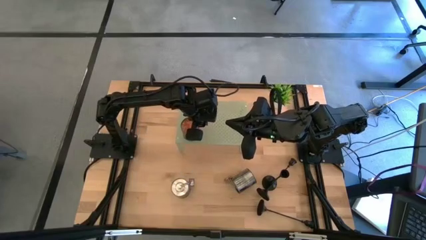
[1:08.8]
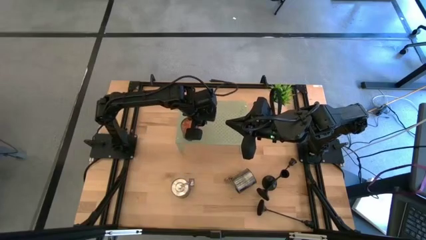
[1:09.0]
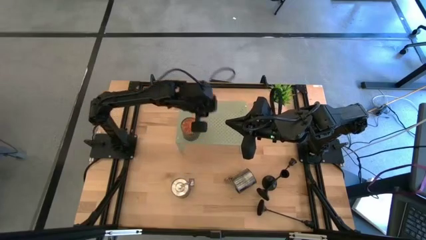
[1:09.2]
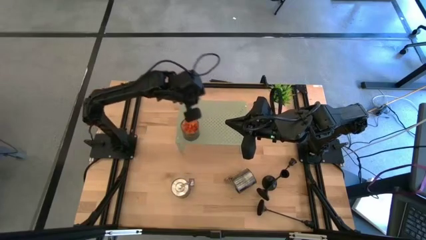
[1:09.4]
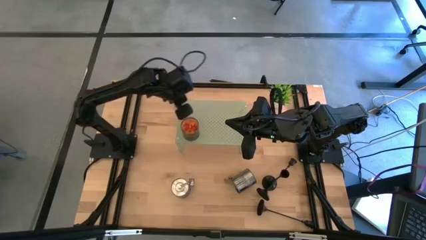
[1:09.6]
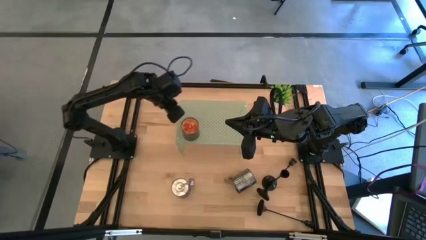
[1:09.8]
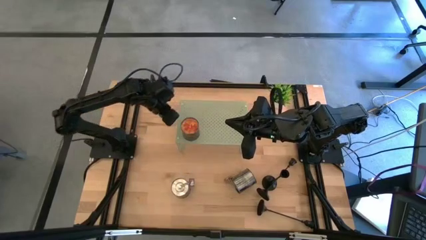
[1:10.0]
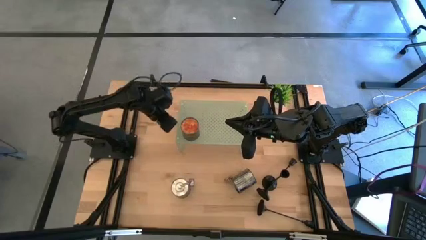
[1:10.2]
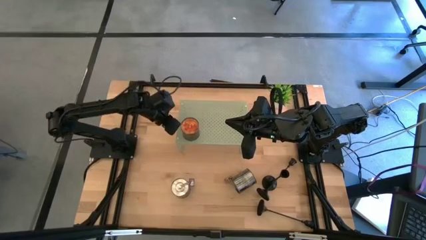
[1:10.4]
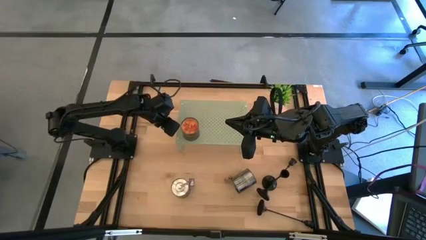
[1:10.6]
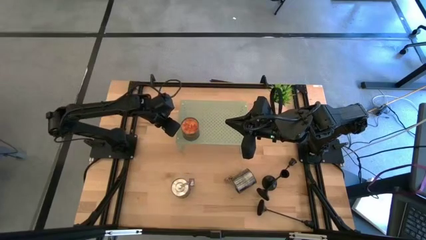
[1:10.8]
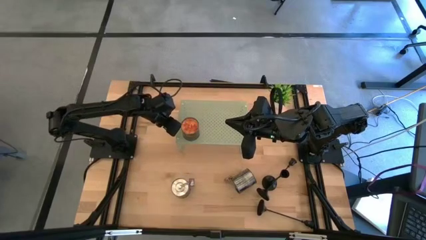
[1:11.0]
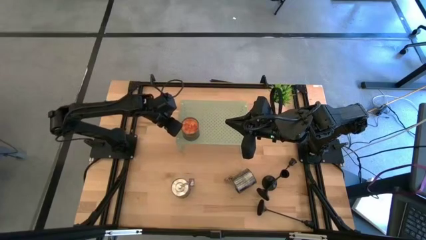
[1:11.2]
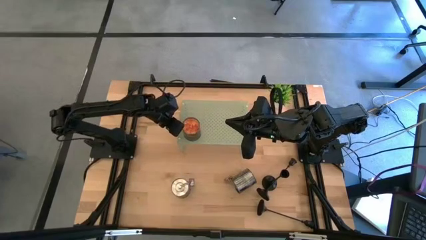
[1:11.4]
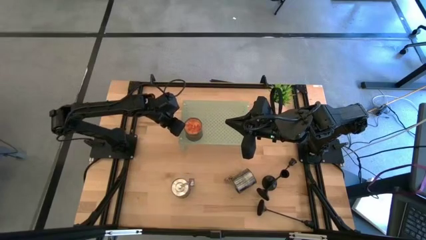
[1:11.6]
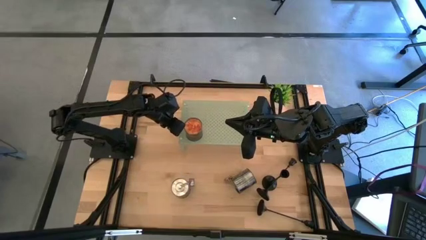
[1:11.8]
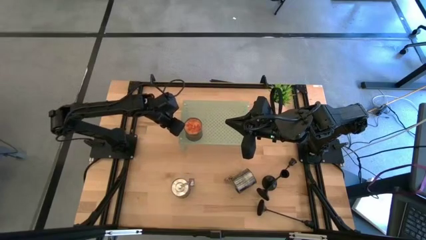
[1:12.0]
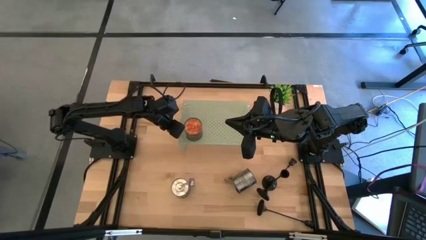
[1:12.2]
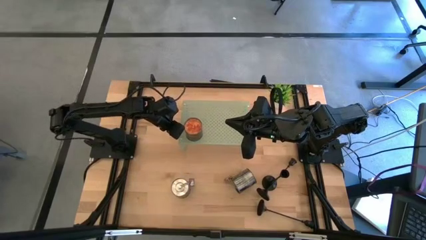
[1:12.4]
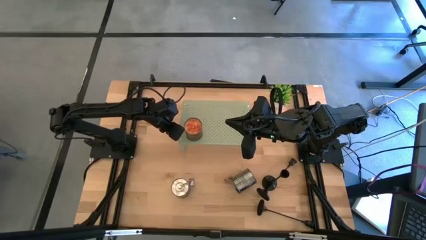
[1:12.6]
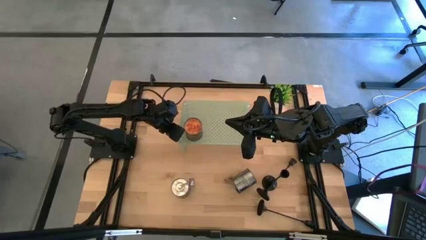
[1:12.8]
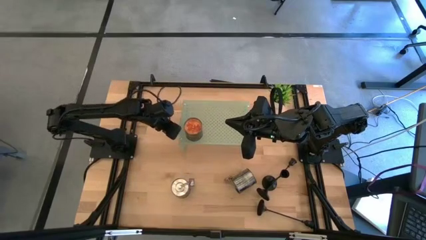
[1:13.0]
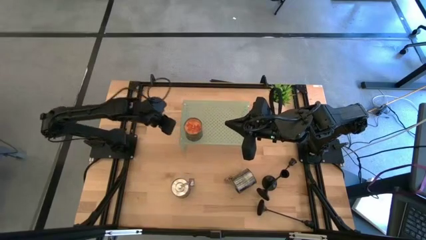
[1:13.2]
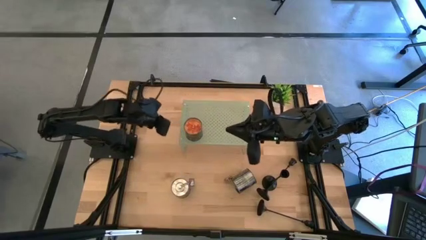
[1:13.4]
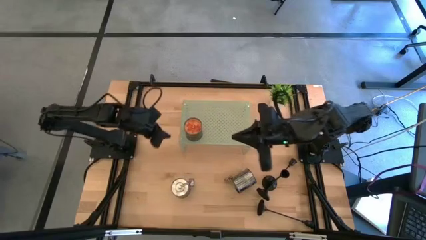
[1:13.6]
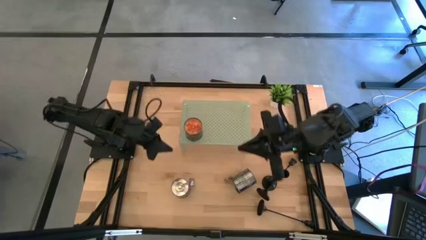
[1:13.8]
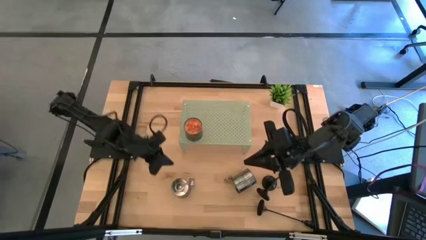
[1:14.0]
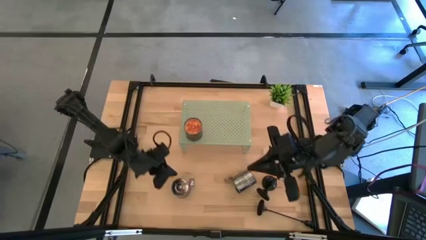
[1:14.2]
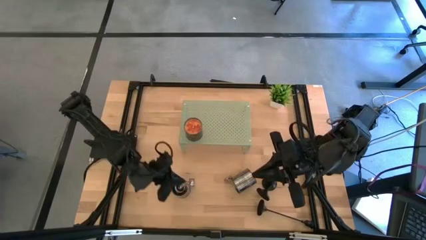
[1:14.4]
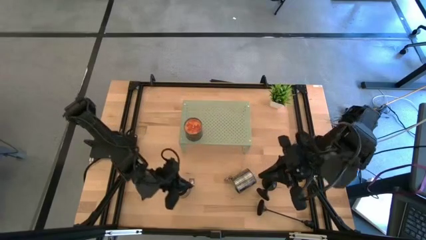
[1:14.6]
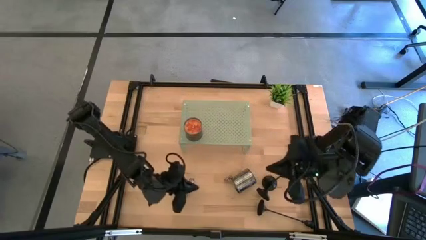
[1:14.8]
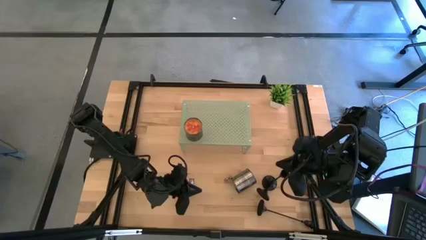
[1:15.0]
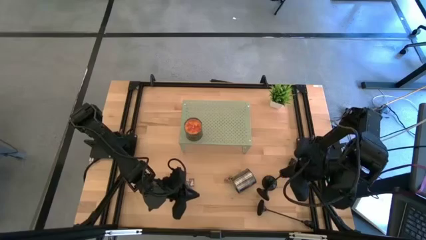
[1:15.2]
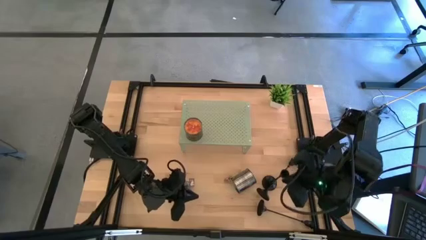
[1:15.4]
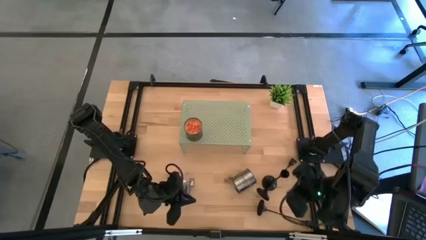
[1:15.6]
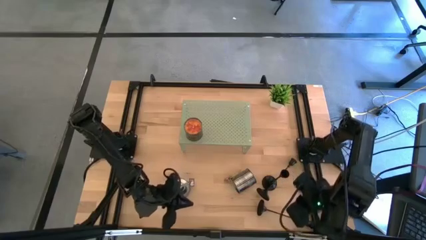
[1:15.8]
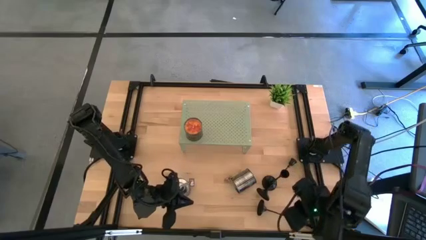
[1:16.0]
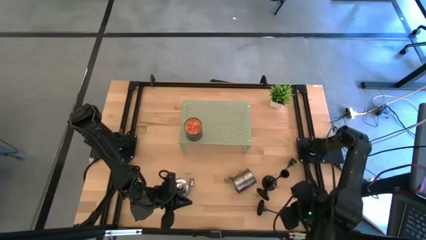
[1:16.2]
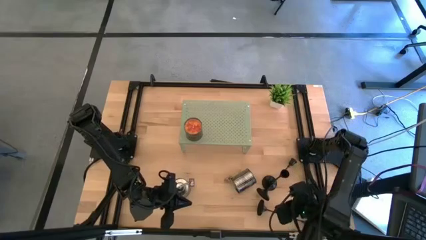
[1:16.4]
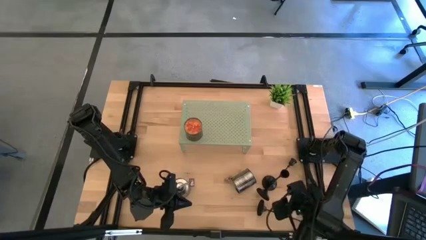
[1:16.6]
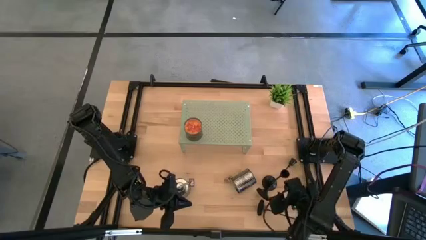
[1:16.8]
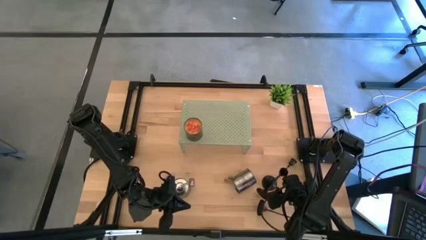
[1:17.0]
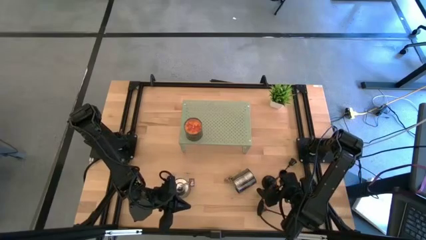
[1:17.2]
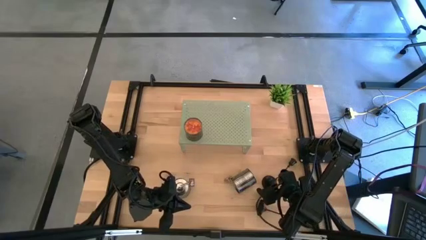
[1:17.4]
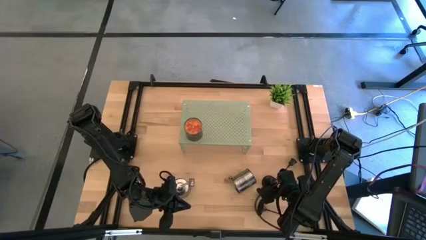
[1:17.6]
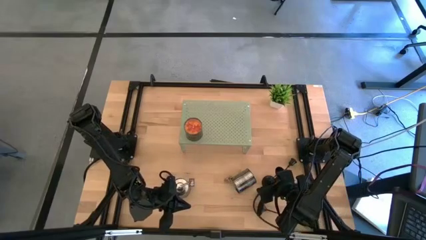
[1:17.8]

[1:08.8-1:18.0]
Task: Pick & Place candle stick holders
Put the top candle holder on the shelf

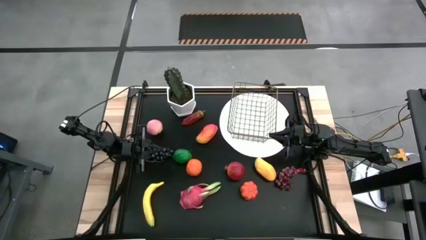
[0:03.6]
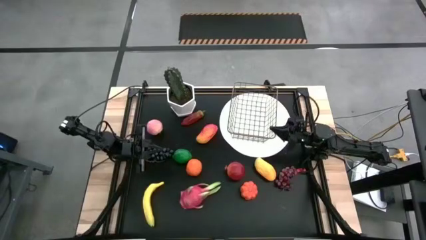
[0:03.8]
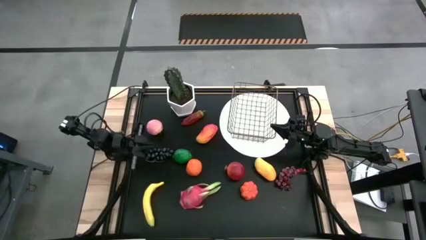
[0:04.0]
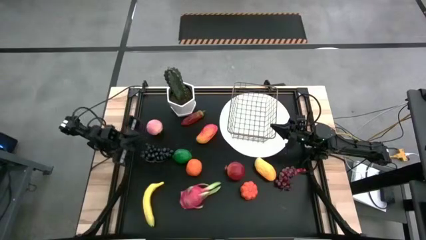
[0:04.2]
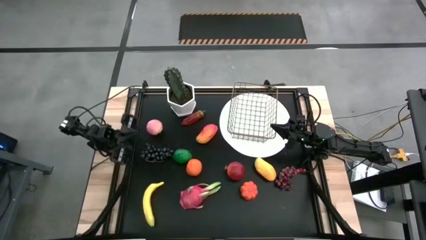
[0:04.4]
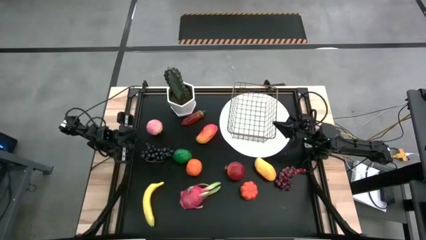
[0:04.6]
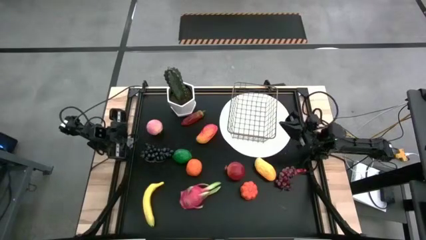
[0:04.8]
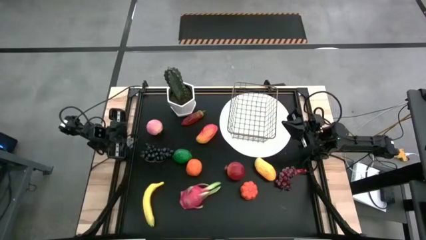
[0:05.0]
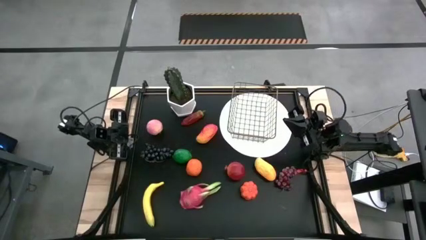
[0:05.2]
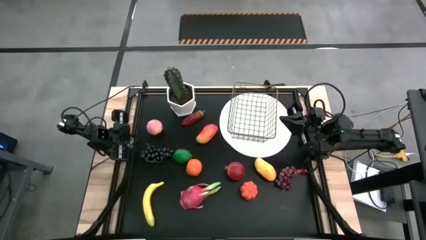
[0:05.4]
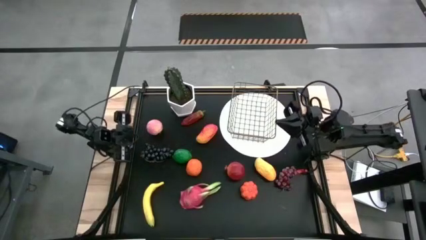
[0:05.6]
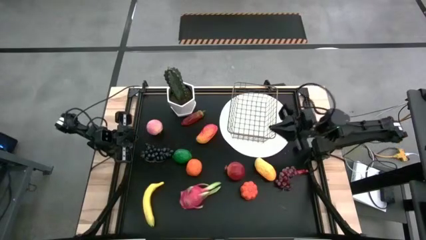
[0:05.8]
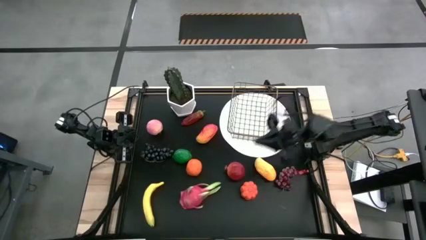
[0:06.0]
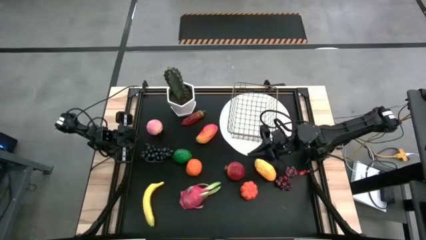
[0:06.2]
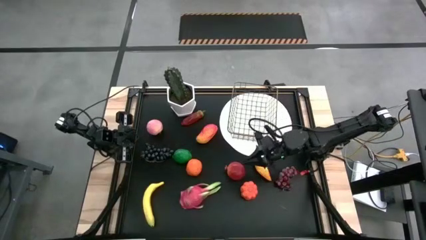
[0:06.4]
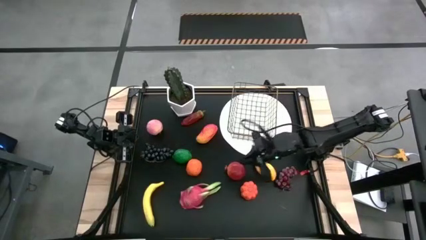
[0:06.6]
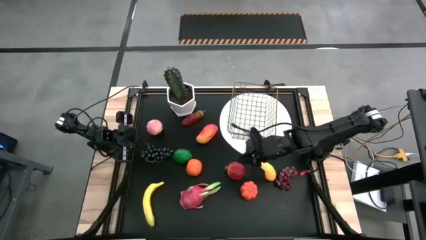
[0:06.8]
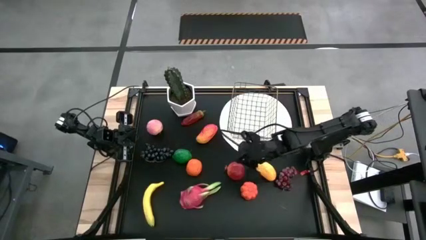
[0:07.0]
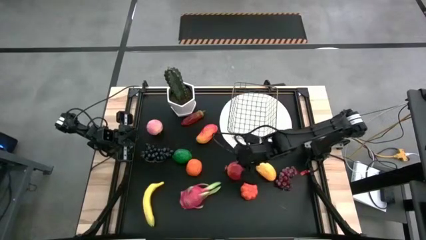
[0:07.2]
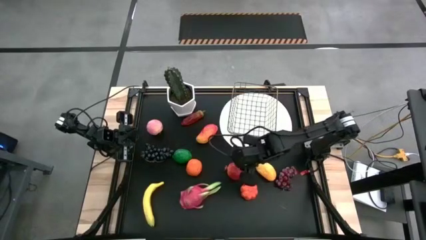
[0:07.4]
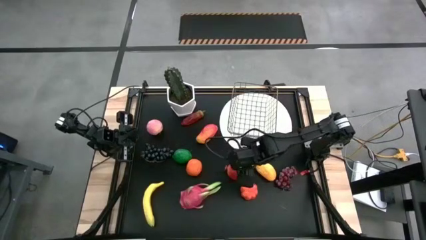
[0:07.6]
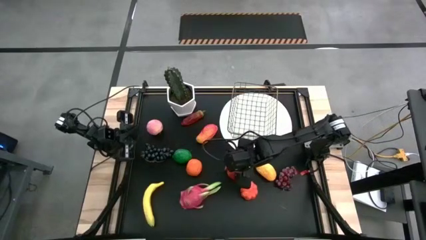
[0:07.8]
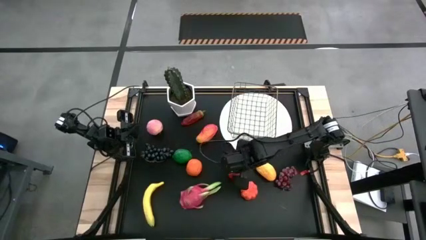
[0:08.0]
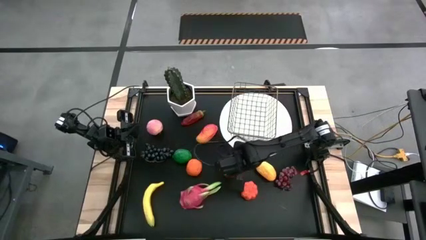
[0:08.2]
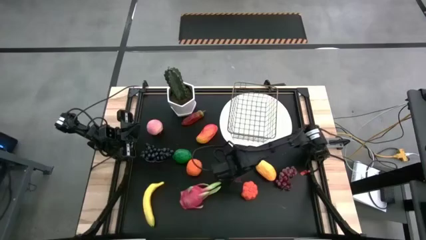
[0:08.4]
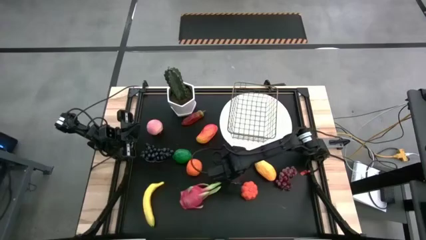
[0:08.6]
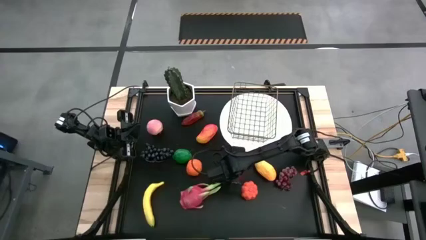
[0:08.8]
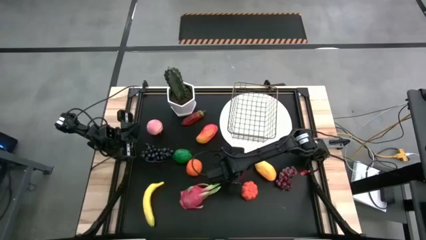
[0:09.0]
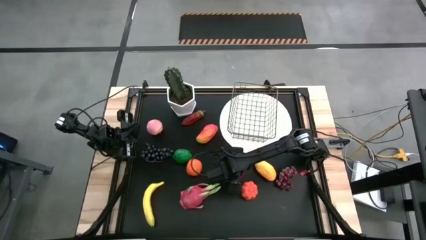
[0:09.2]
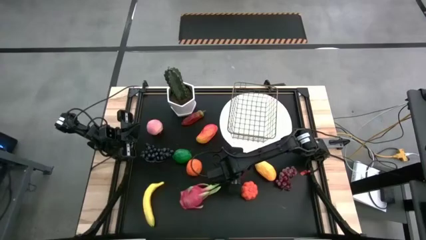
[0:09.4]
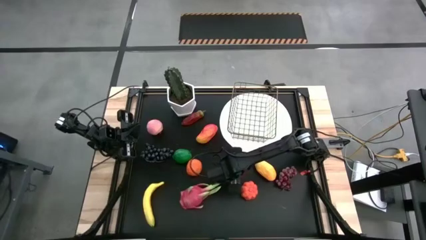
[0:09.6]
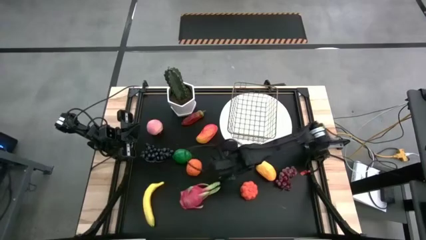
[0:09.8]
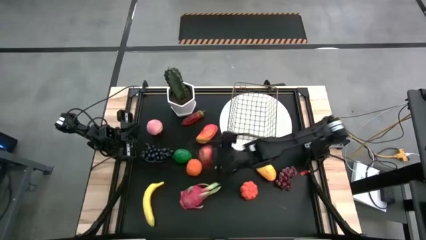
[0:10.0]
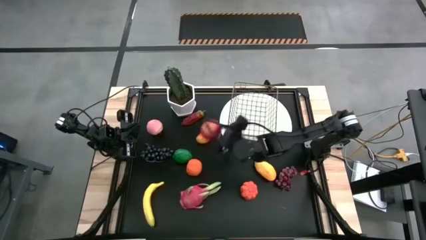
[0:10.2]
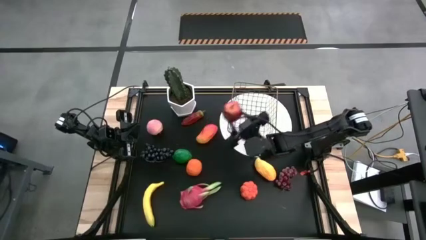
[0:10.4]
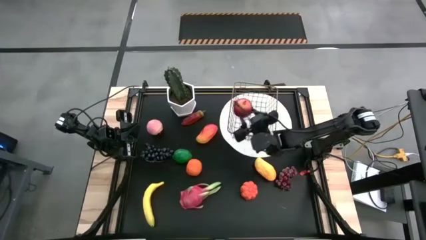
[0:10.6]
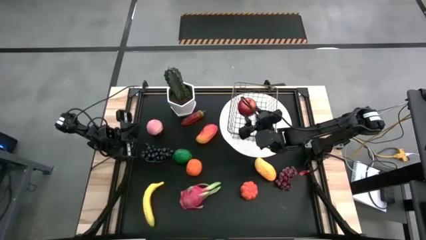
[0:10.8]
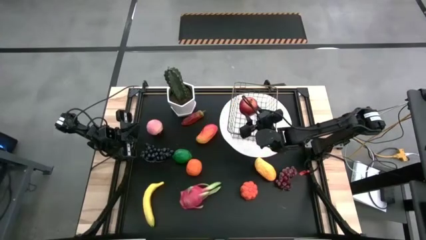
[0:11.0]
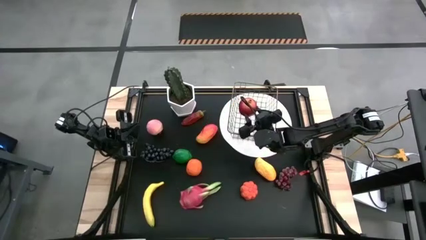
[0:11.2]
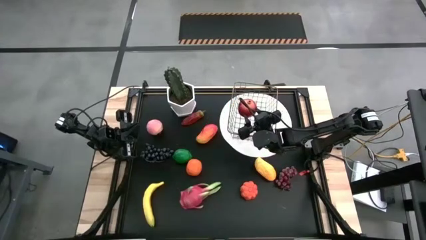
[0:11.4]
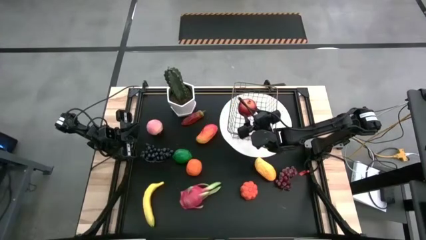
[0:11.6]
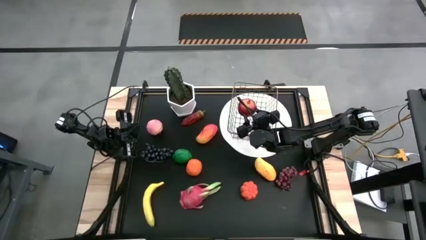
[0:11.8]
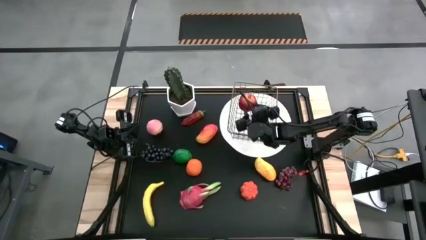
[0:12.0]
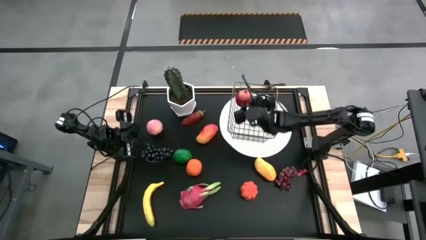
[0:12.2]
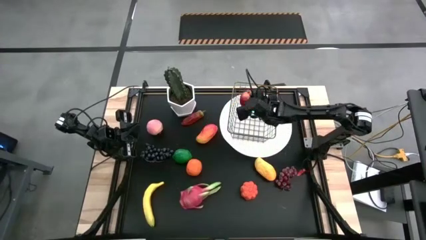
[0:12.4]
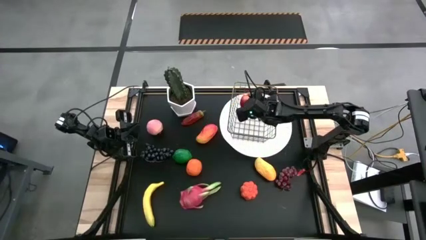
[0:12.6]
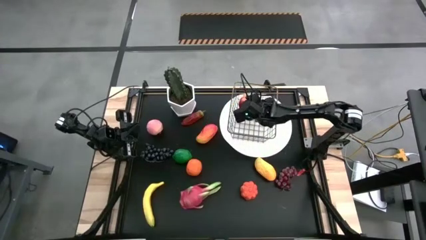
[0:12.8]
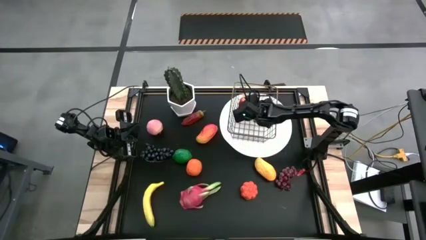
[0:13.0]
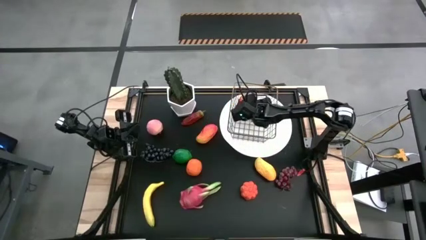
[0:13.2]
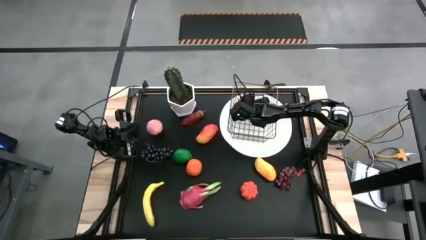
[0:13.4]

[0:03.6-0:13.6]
Task: Build produce basket
Put the pomegranate into the wire basket
